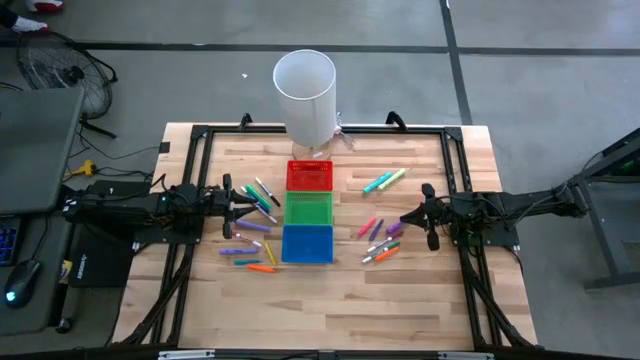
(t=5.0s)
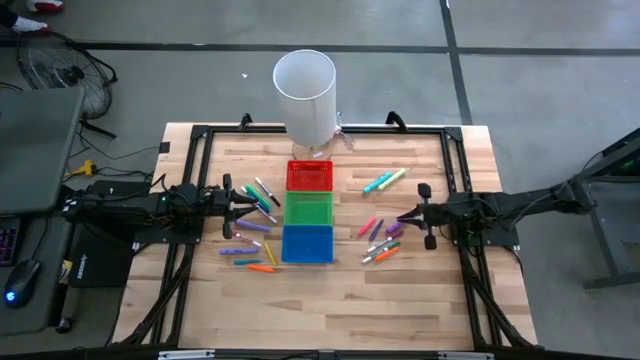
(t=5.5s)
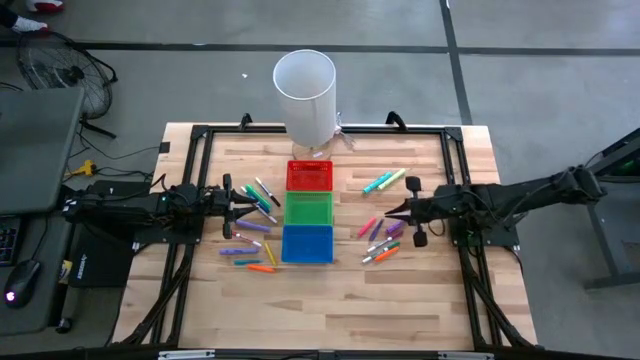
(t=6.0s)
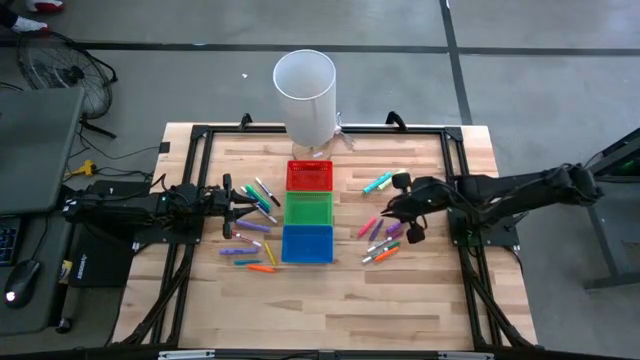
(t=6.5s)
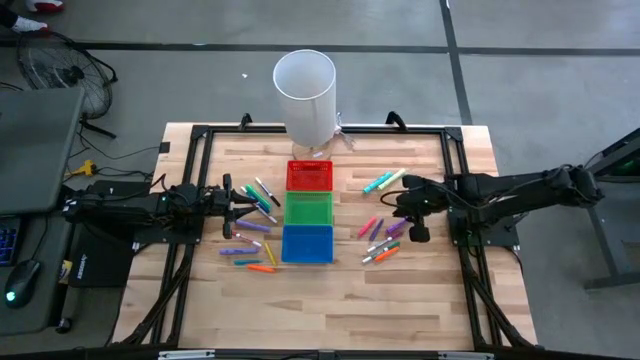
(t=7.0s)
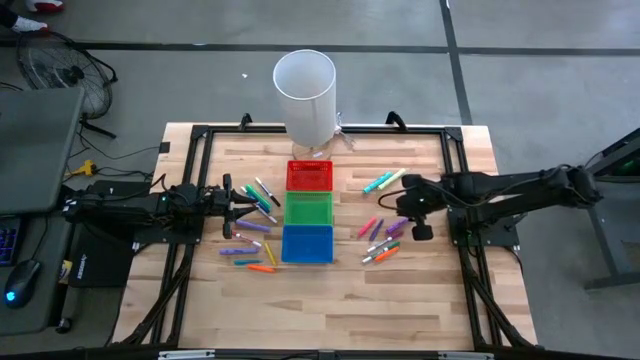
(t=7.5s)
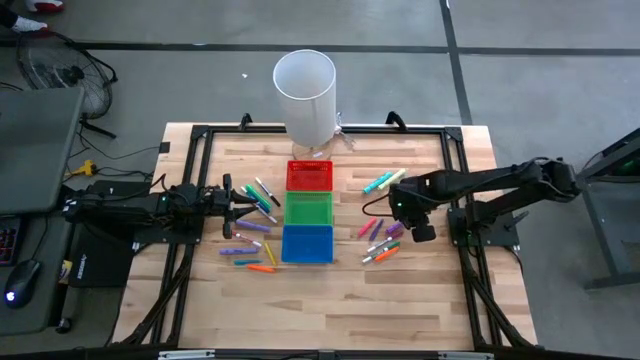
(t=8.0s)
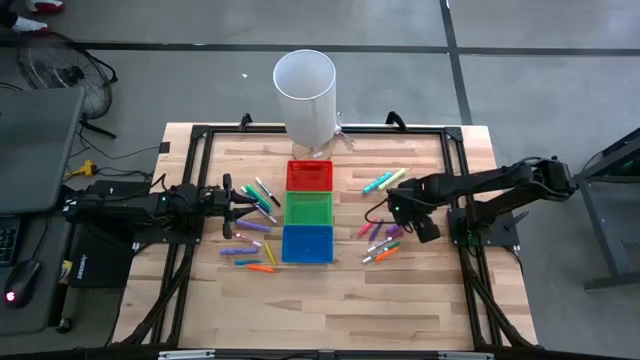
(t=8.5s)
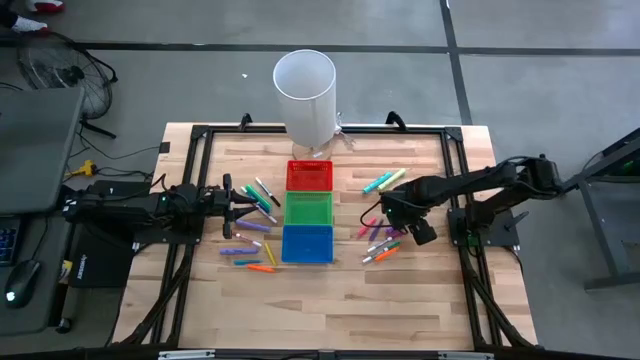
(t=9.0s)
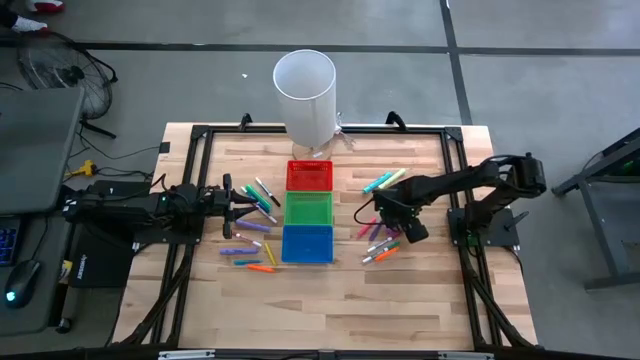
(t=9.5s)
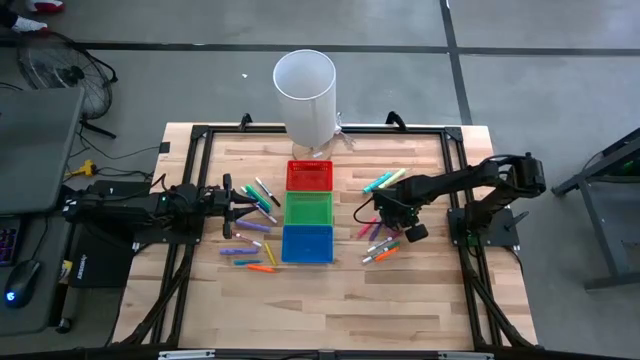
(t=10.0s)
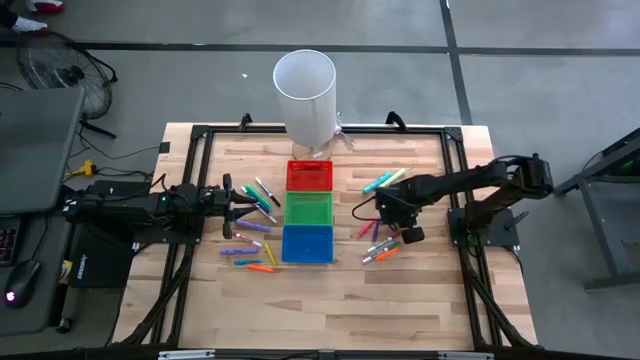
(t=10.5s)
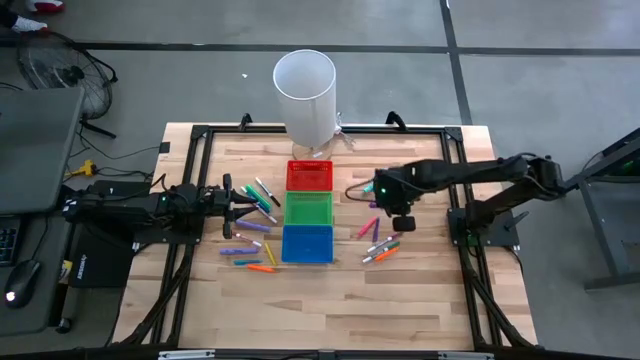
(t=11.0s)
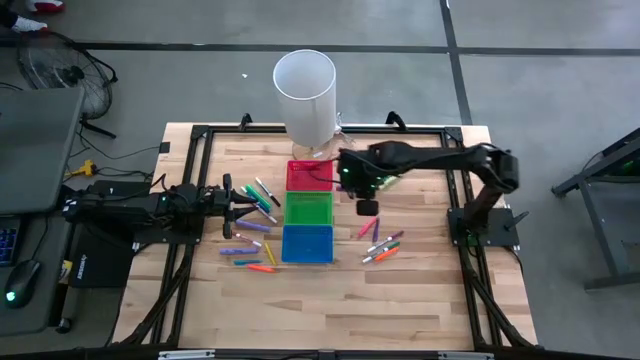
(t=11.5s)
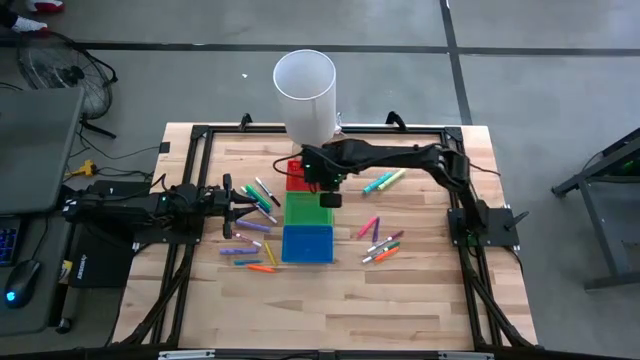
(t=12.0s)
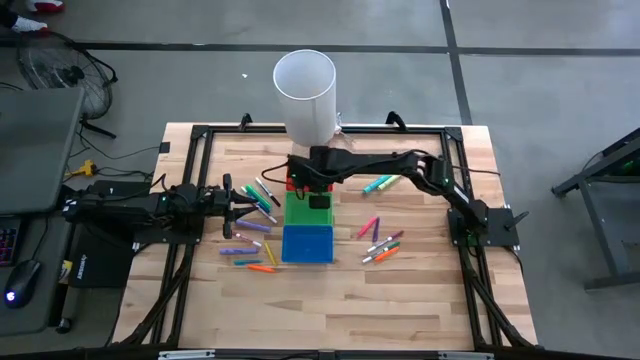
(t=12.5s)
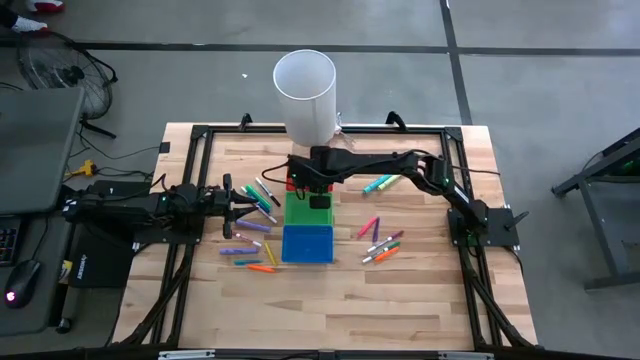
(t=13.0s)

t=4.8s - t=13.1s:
Task: Pick & Place Markers
Put the violet highlighter into the red bin

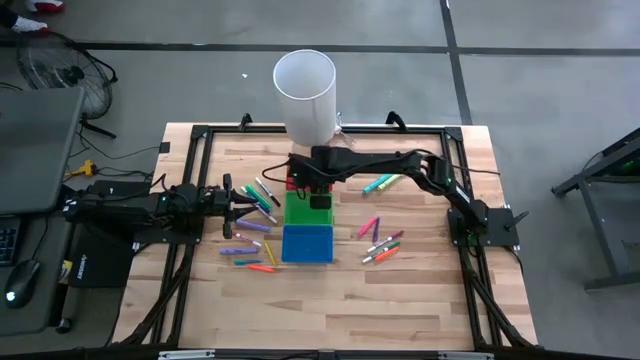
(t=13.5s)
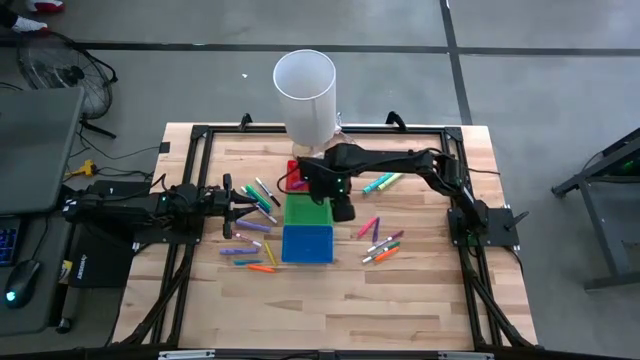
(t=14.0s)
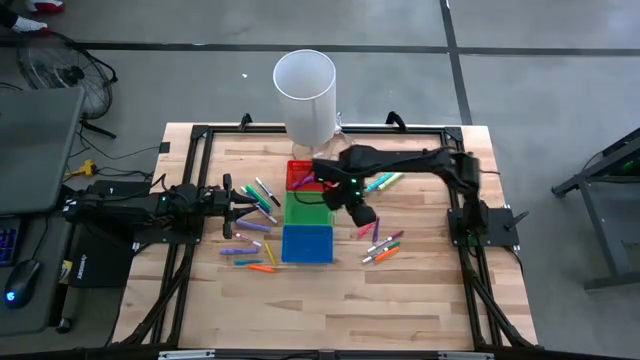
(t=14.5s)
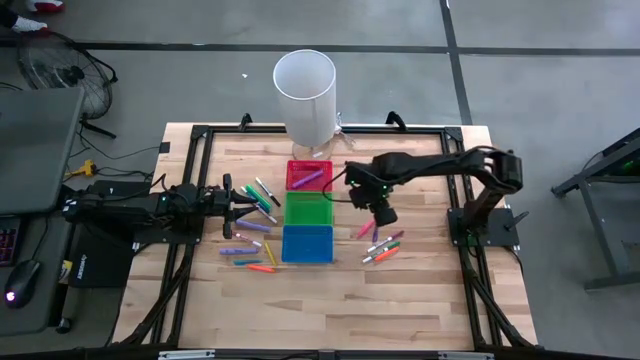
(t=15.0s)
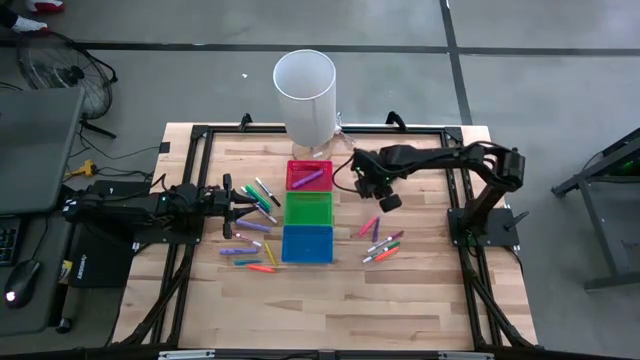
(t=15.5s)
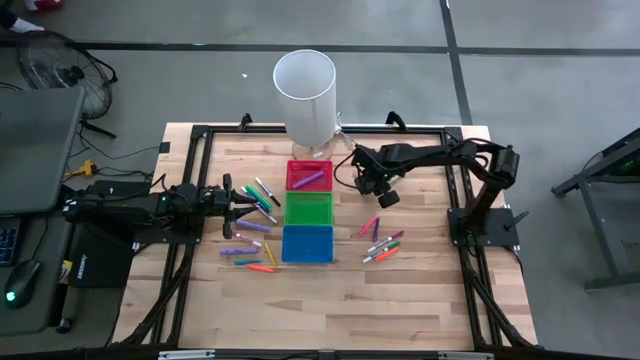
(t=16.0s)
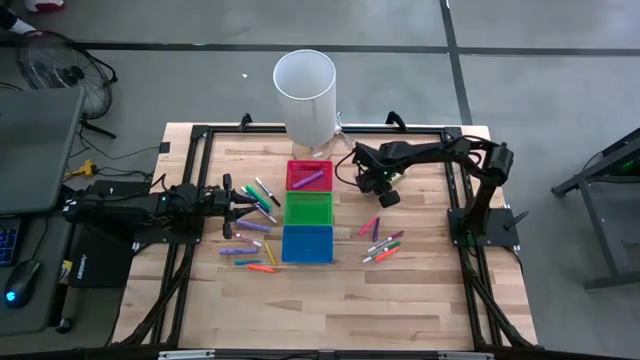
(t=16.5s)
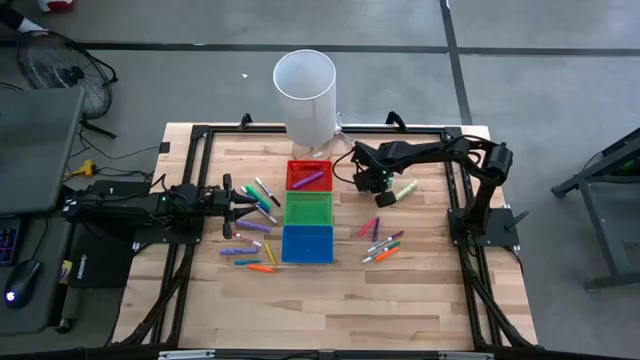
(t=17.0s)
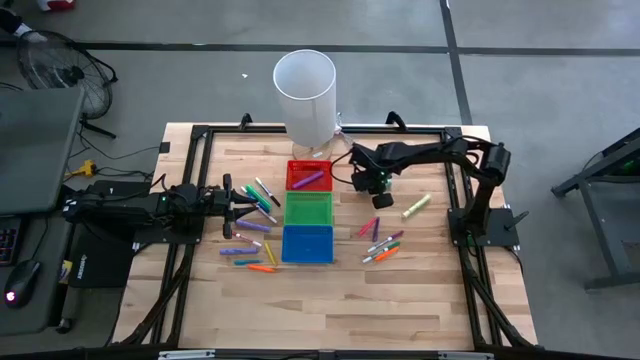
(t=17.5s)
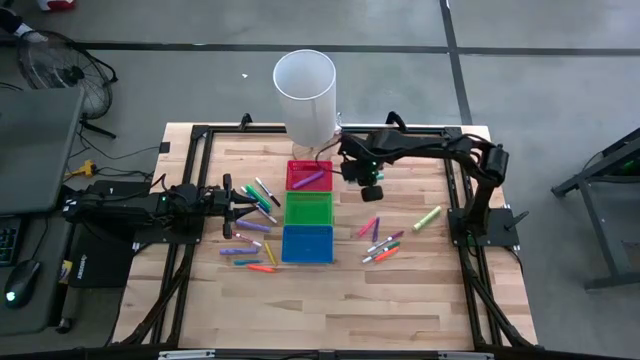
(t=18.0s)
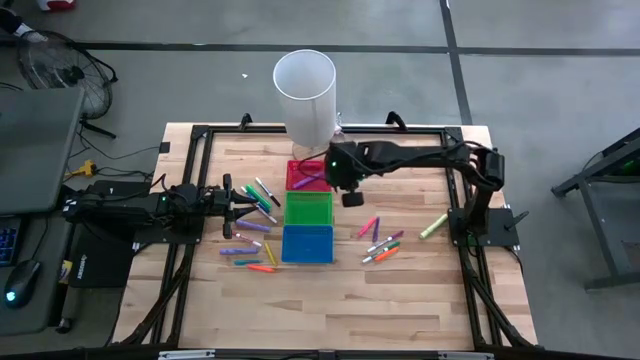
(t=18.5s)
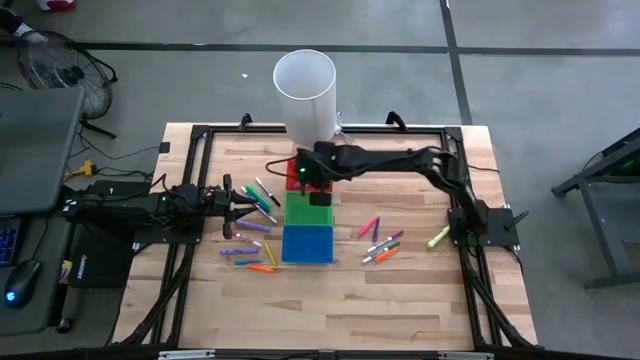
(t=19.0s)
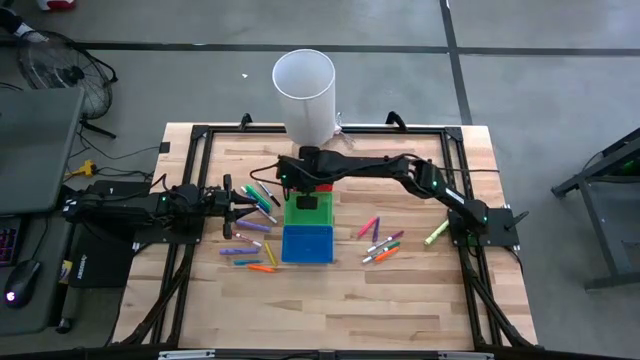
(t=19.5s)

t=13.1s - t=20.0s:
Put the light blue highlighter into the red bin

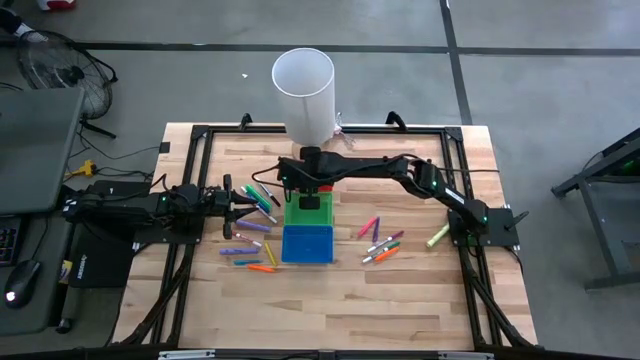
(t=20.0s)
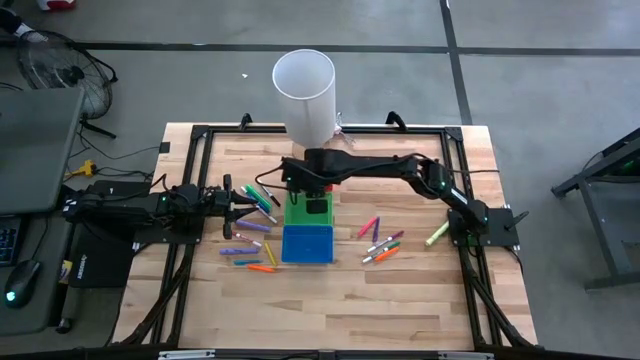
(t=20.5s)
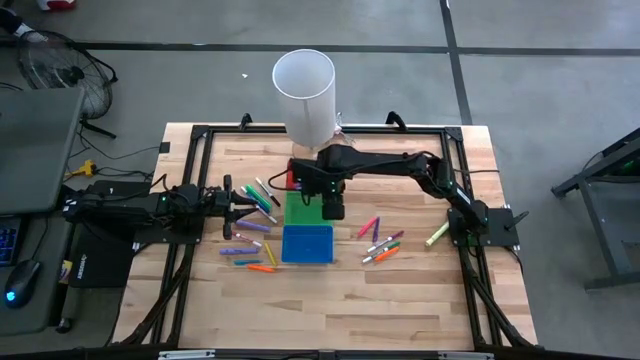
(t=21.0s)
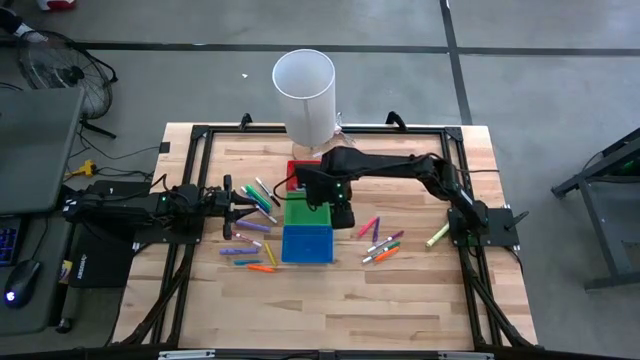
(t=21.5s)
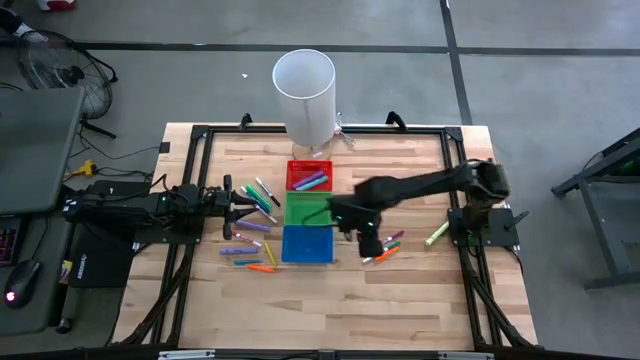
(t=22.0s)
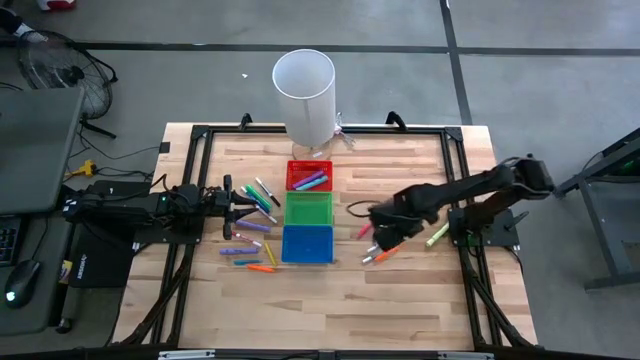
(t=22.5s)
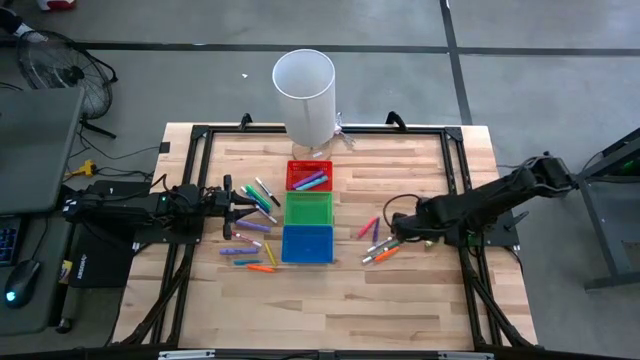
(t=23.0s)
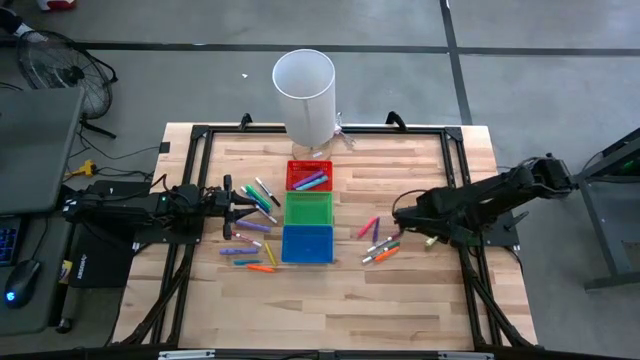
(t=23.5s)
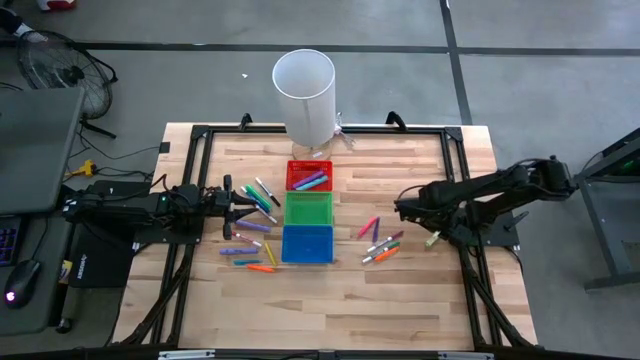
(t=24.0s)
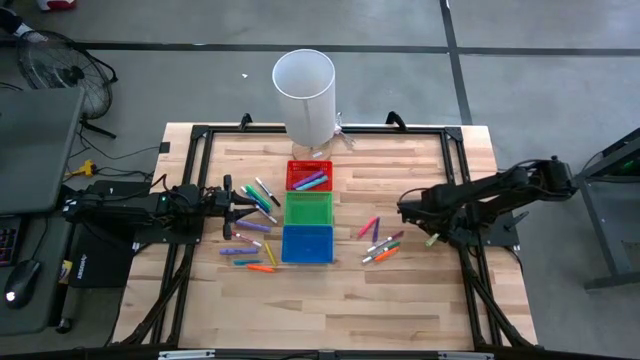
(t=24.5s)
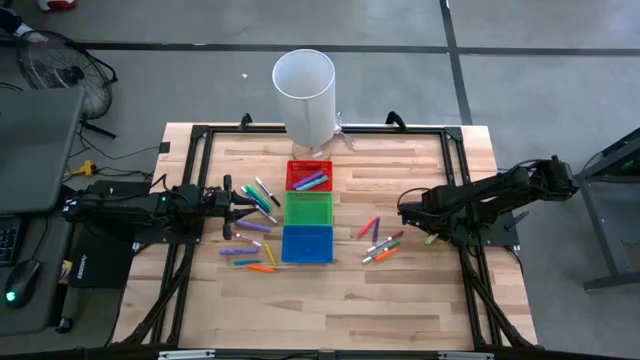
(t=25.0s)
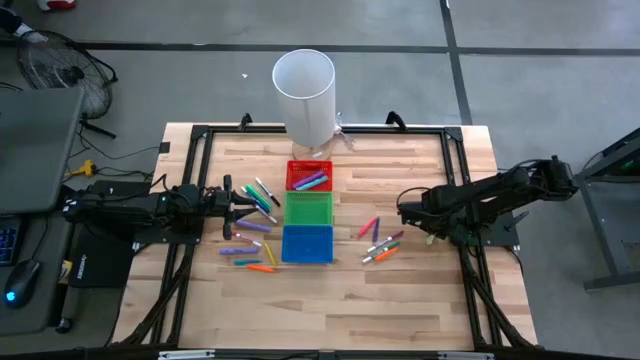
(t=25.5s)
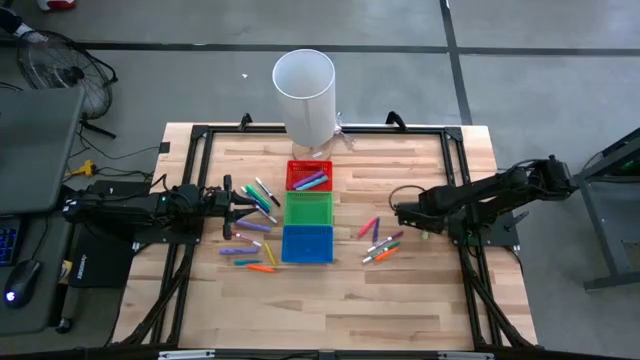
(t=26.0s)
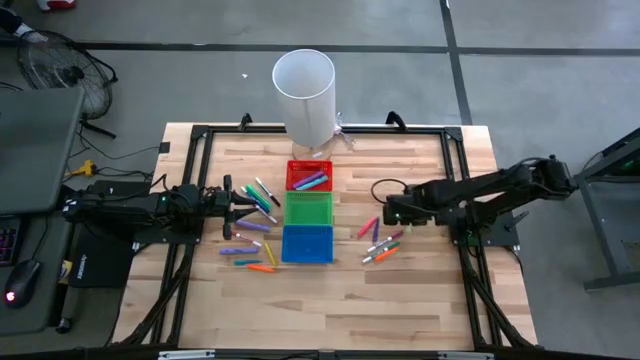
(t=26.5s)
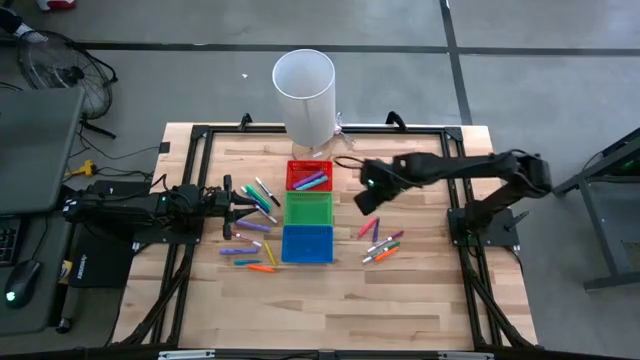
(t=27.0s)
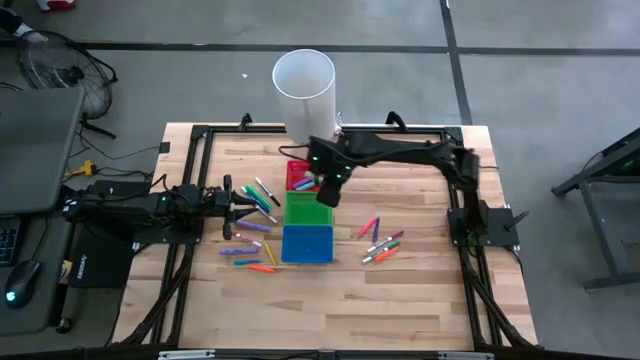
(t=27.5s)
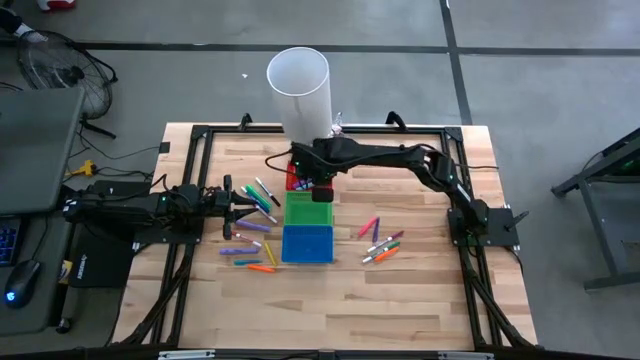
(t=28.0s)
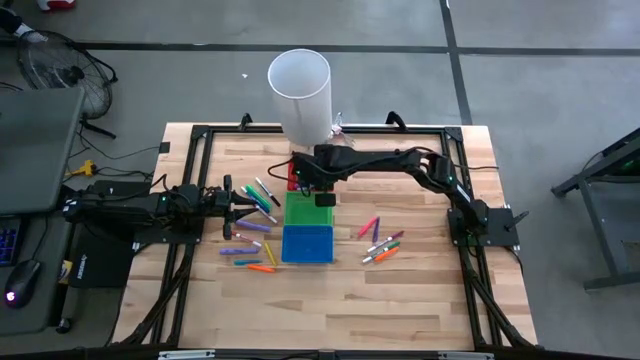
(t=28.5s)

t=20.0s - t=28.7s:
Put the light green highlighter into the red bin
